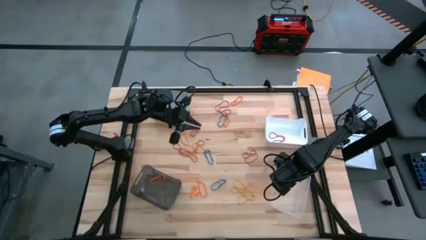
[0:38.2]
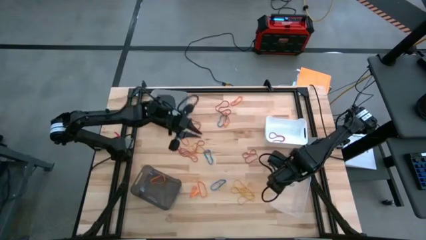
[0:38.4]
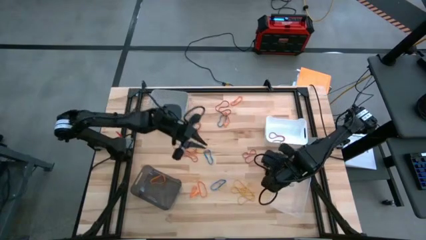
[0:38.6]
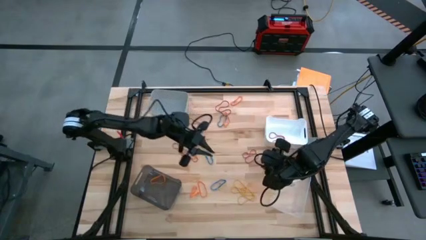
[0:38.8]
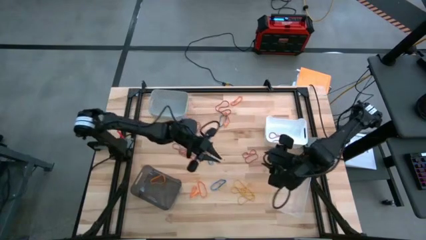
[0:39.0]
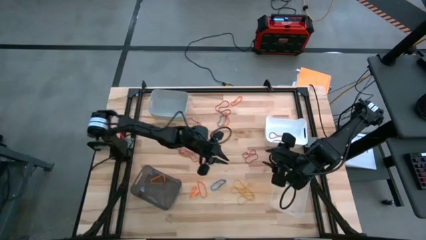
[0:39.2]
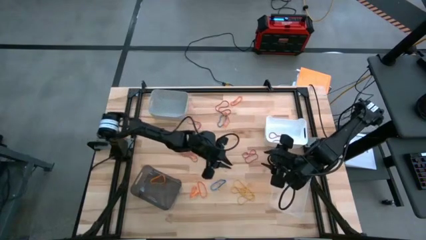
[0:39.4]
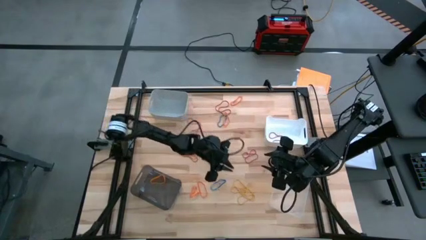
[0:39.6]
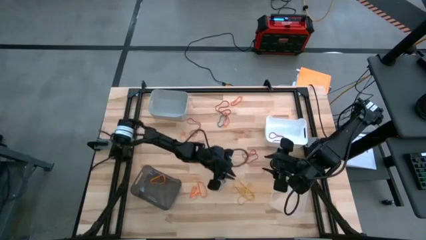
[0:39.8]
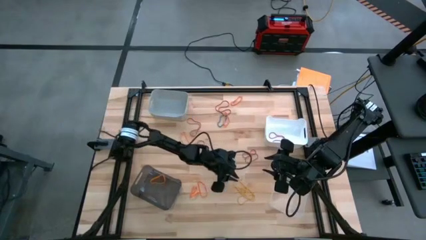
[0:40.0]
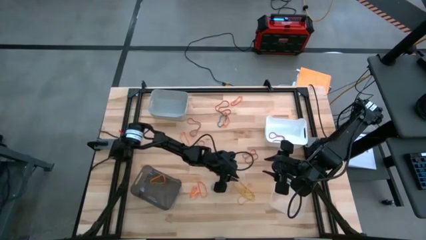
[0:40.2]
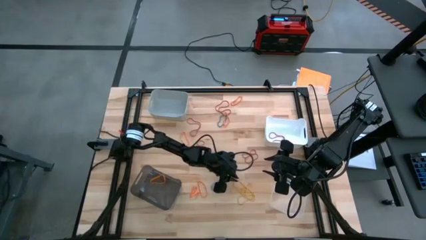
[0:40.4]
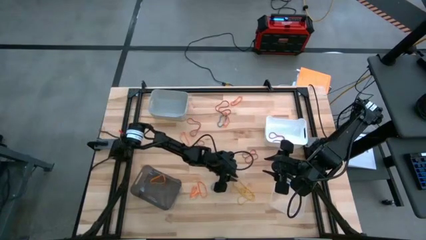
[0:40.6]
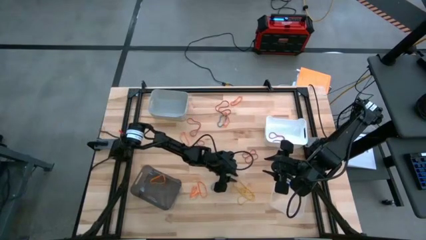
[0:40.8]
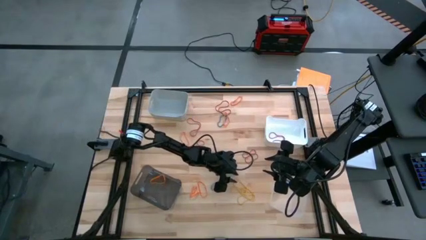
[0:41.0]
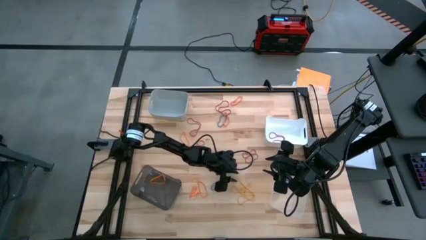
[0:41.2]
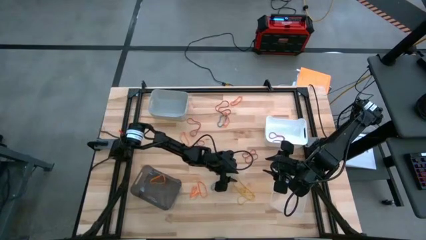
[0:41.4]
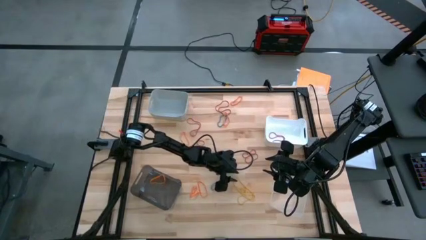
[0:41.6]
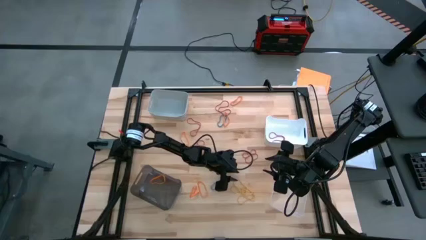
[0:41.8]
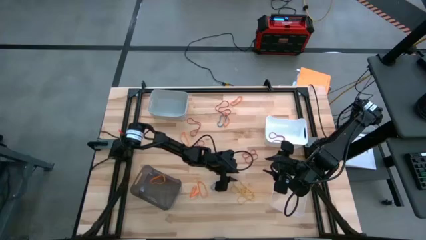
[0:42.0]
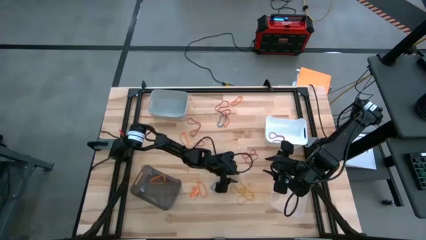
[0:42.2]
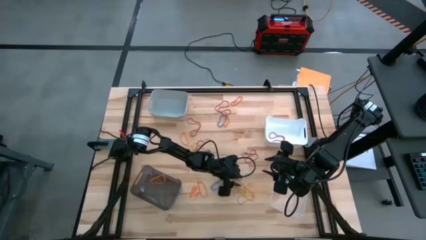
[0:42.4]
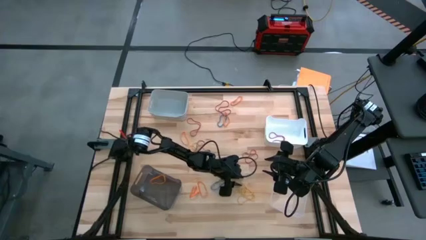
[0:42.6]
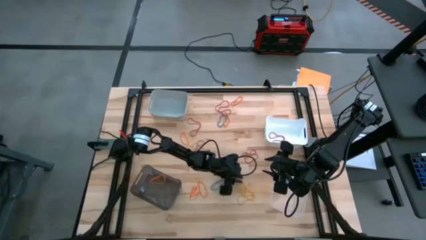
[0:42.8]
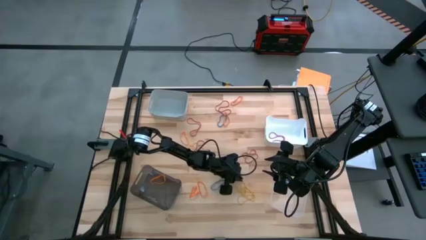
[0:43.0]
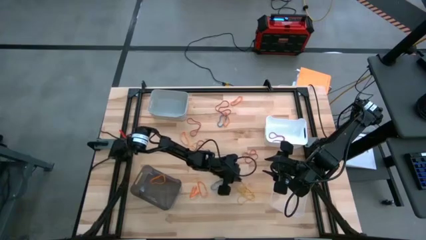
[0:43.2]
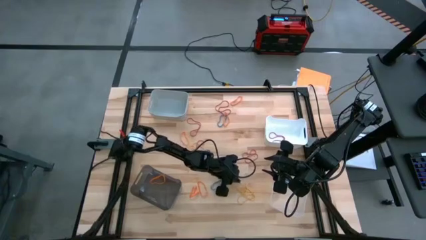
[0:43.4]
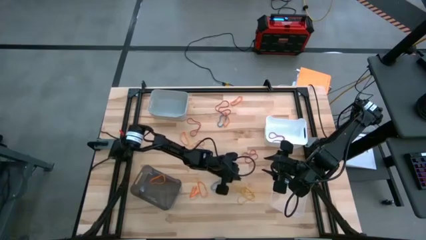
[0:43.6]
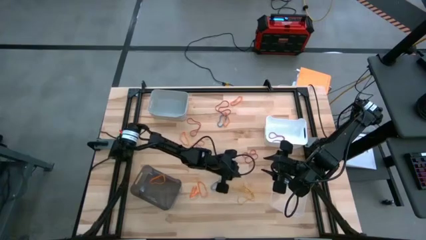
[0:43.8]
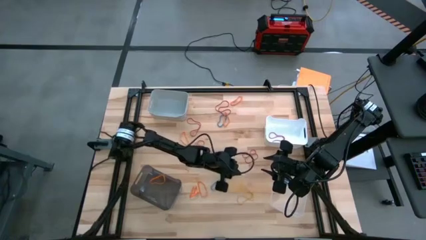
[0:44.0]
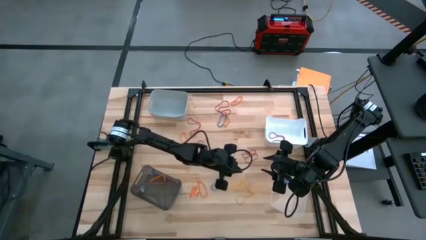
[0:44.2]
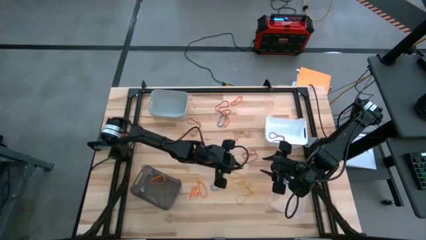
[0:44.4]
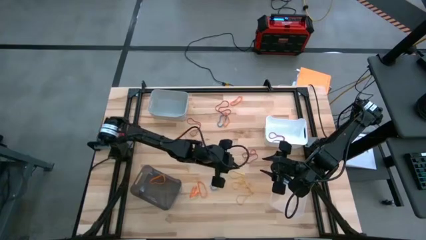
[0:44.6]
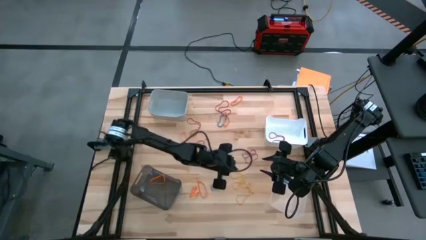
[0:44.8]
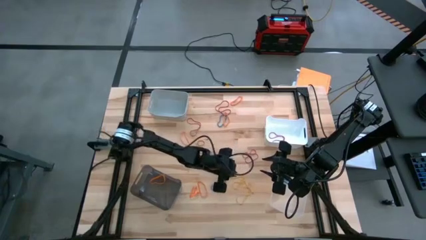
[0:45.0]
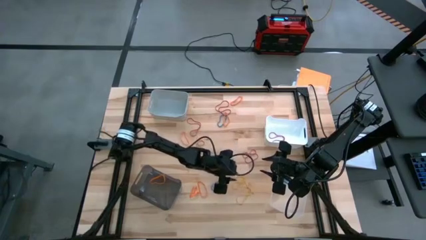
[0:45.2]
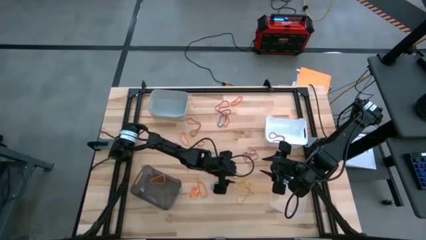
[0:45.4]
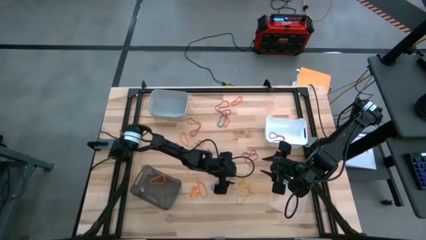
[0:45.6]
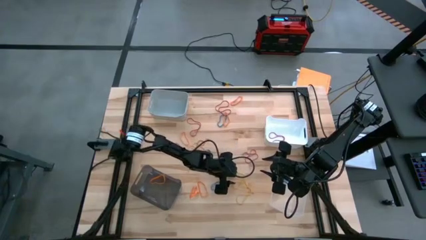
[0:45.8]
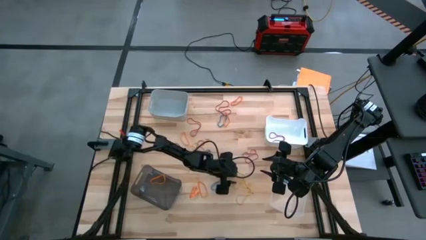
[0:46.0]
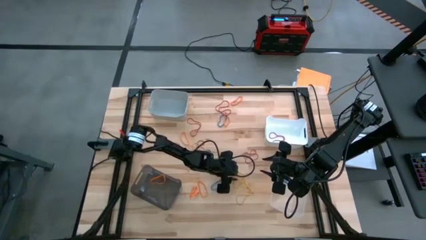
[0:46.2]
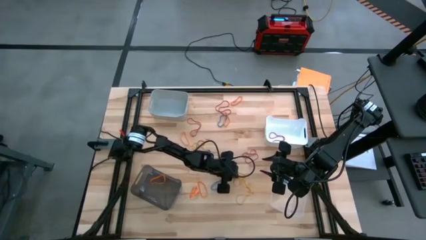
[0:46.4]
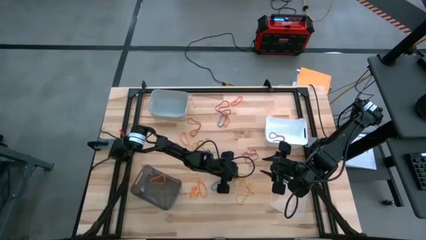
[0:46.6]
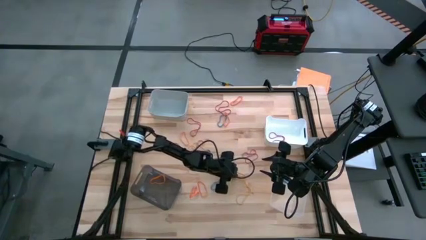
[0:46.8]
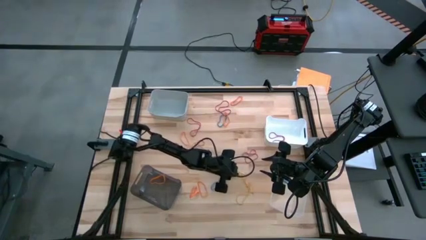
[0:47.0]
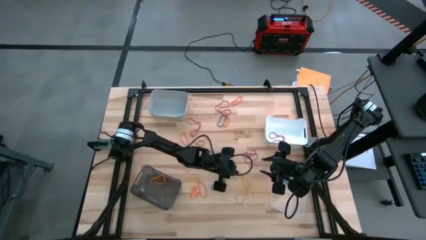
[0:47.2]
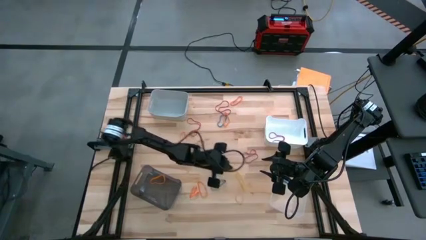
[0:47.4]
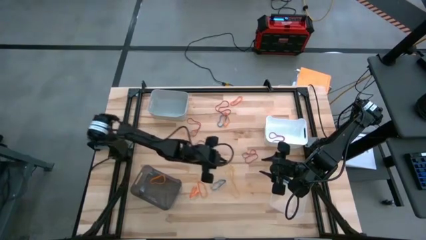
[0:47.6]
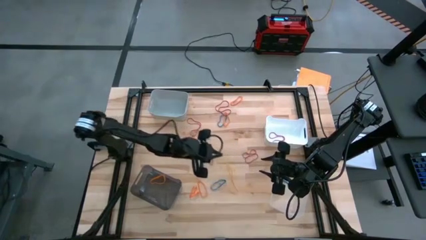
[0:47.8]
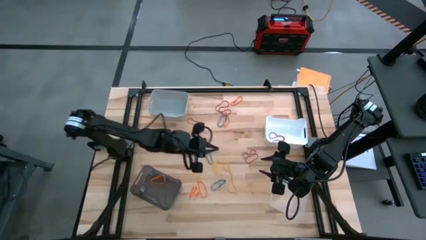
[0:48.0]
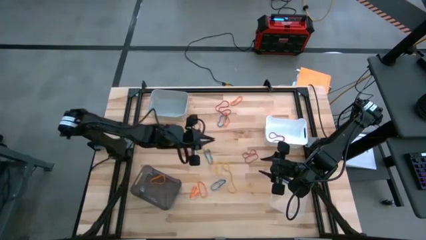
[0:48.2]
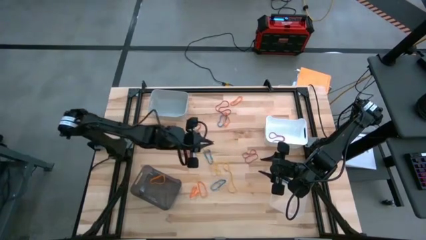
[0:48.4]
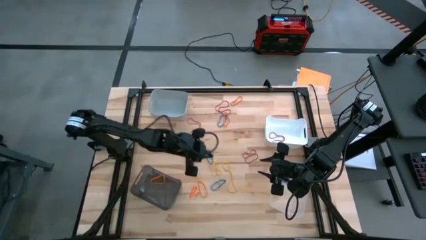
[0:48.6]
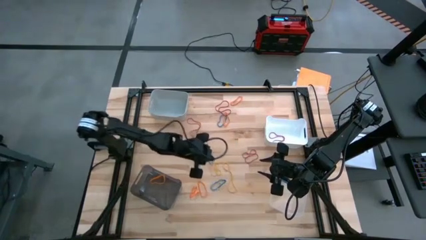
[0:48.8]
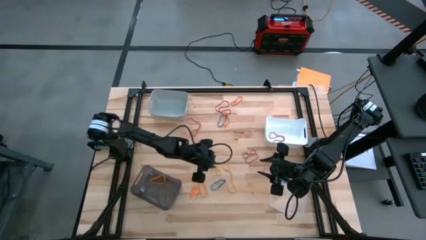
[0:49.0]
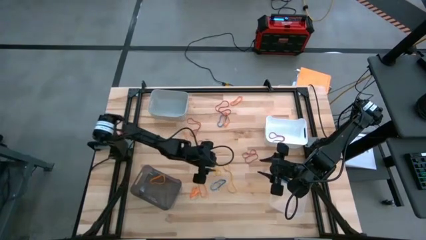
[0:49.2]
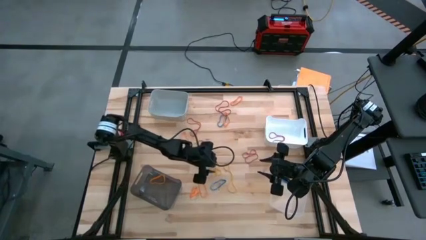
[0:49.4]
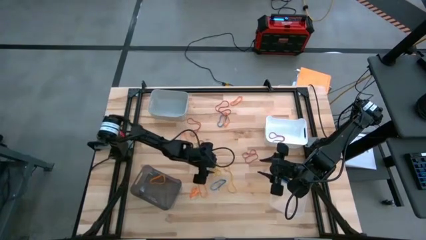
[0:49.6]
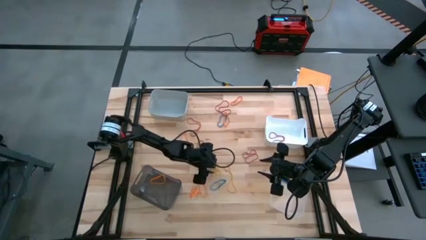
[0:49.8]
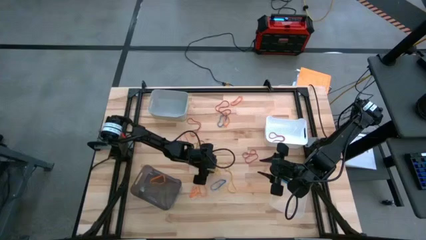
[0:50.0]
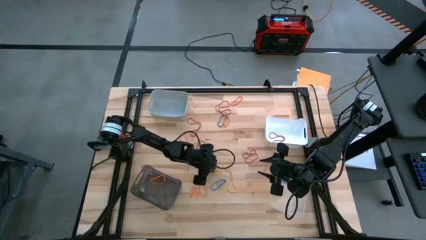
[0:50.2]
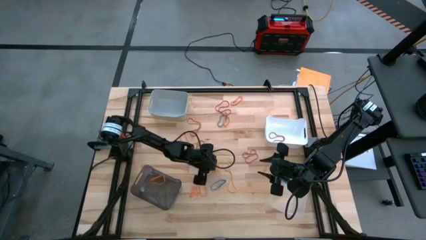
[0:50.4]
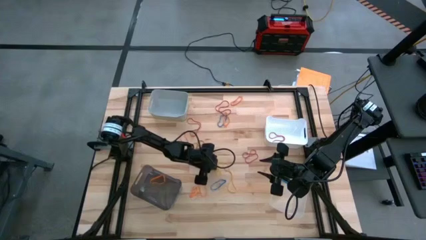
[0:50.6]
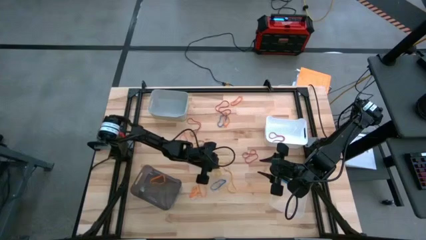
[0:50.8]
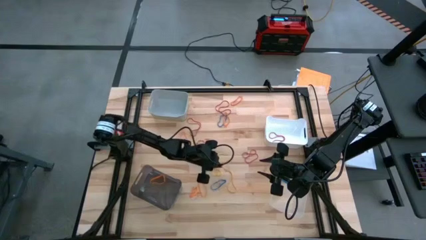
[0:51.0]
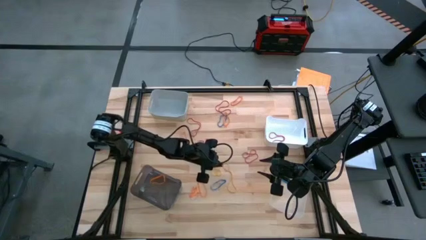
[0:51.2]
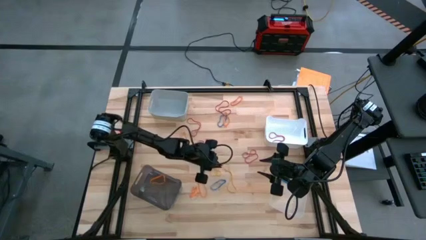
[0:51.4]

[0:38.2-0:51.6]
Task: Sort rubber bands into baskets
Put the yellow rubber band into the gray bin

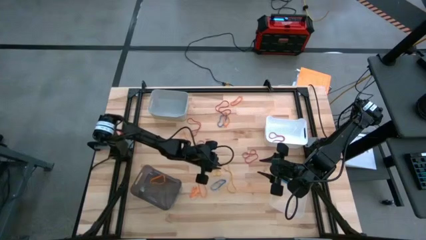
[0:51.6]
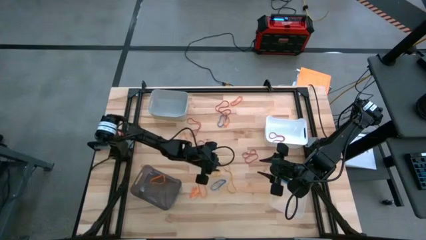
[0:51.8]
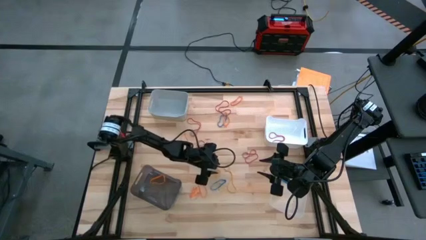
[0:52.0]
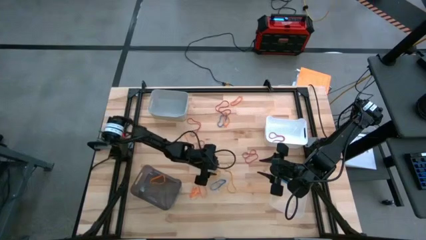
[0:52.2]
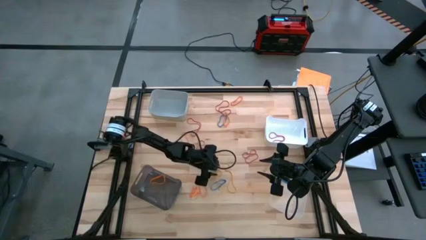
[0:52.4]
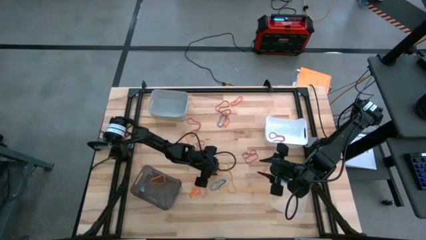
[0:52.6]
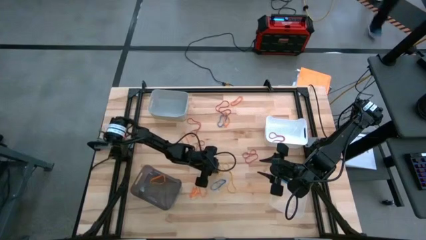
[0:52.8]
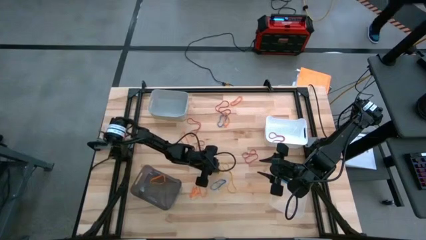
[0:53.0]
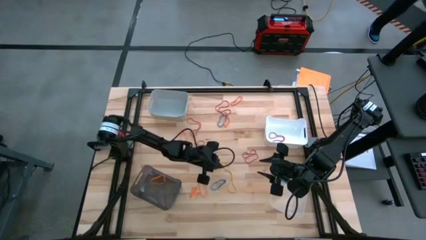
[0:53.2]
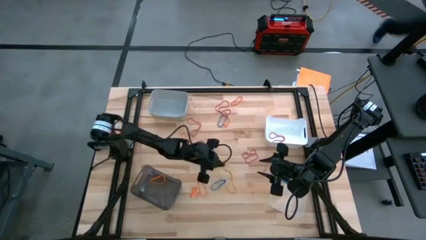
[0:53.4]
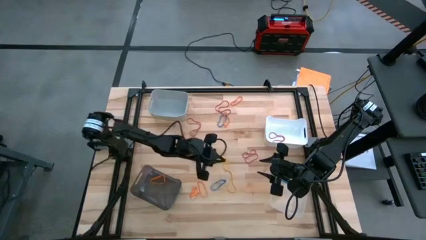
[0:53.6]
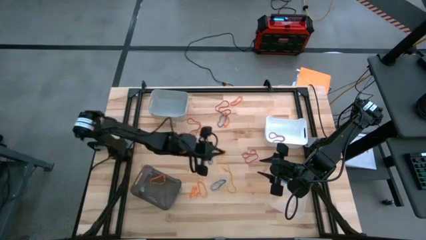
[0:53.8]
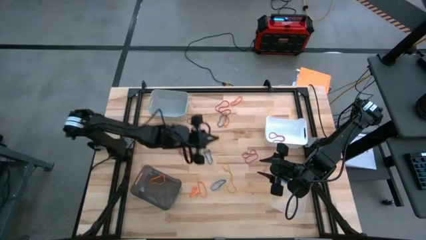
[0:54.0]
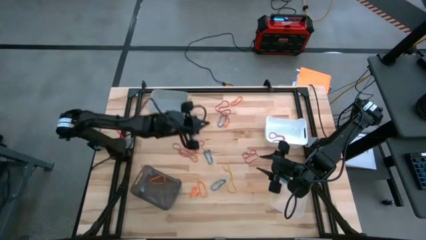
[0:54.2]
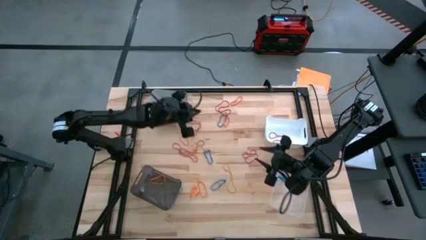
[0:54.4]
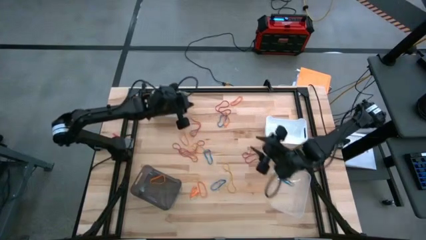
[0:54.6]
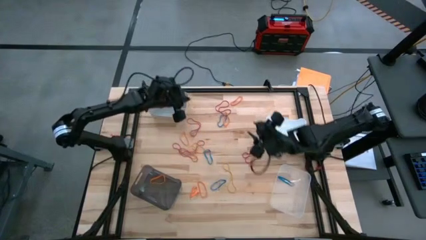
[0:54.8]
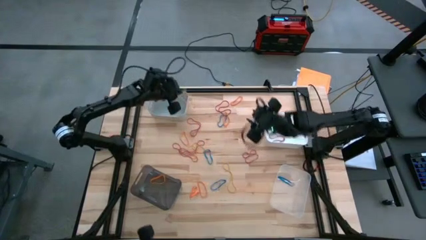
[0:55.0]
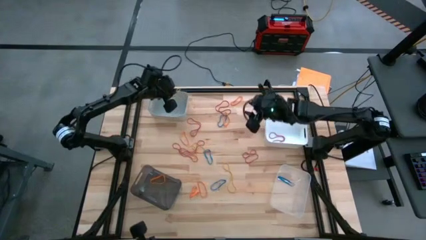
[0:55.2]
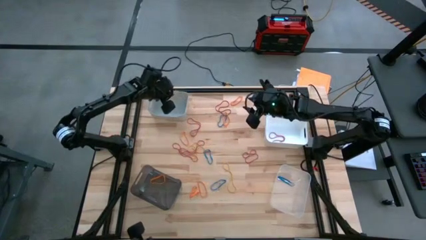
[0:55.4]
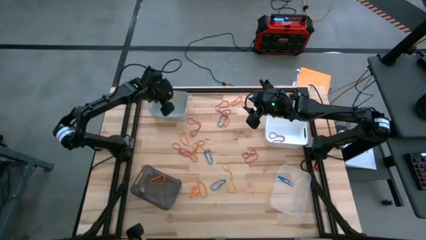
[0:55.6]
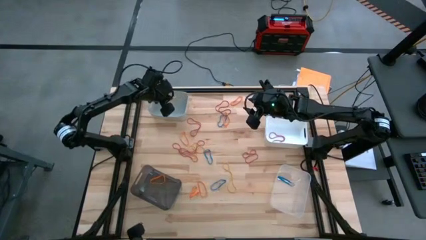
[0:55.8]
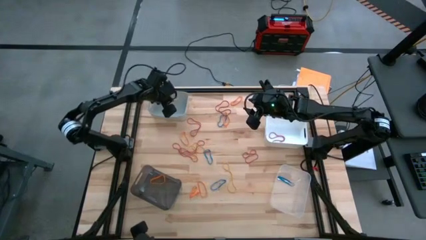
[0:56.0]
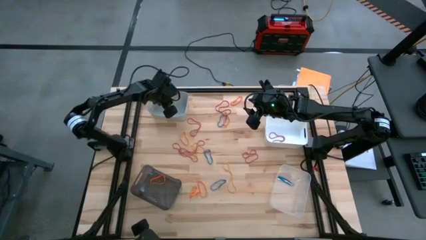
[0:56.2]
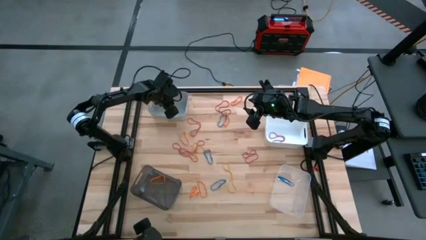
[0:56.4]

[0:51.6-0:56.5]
Put the yellow rubber band into the gray bin
